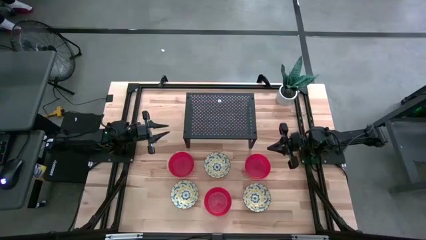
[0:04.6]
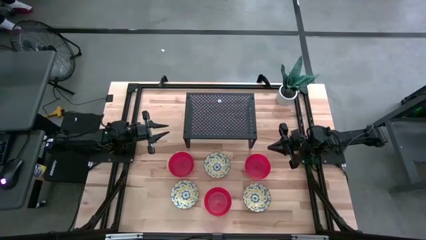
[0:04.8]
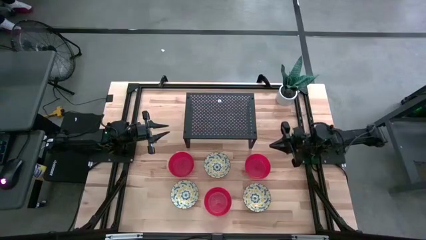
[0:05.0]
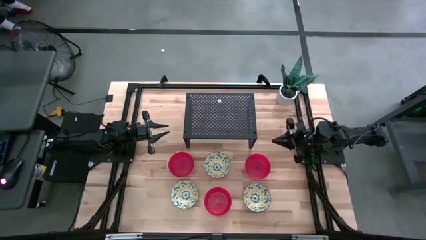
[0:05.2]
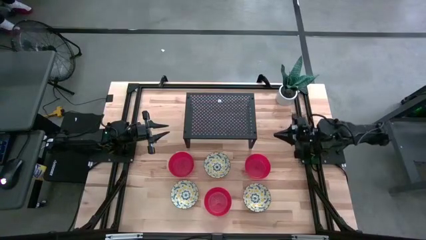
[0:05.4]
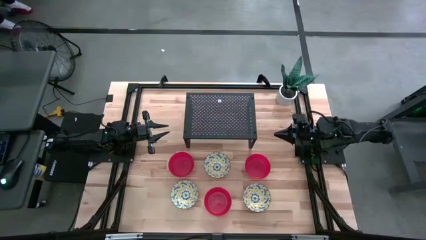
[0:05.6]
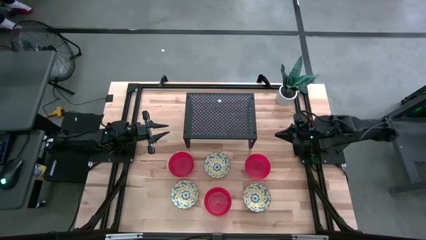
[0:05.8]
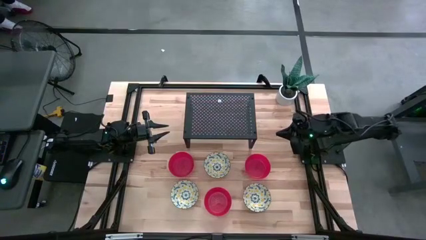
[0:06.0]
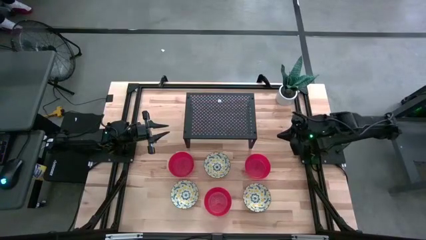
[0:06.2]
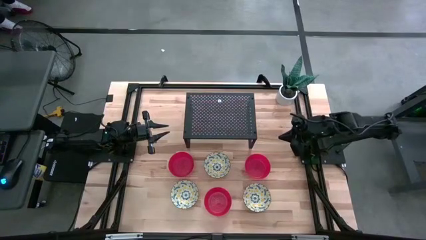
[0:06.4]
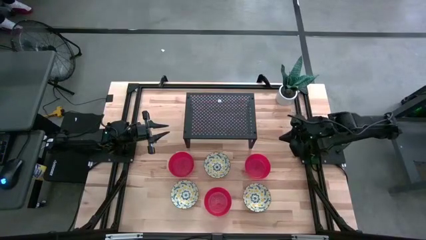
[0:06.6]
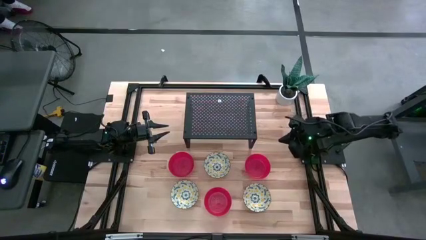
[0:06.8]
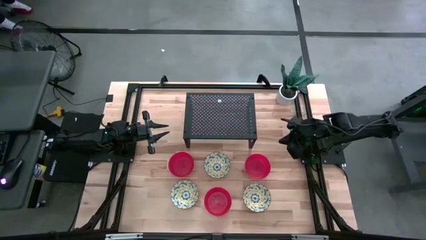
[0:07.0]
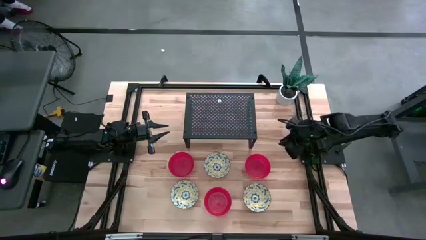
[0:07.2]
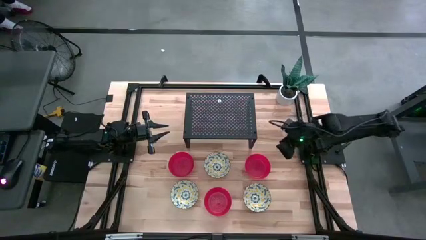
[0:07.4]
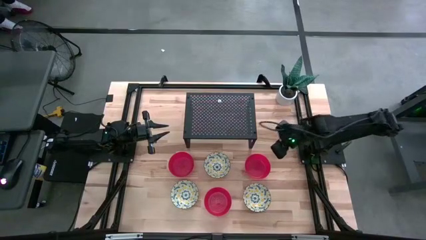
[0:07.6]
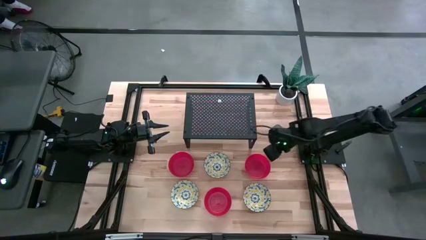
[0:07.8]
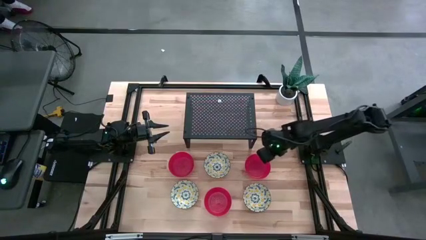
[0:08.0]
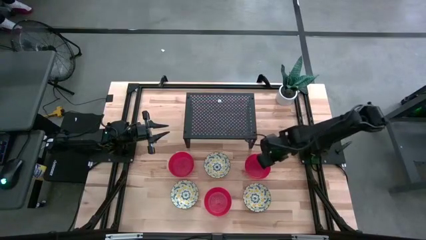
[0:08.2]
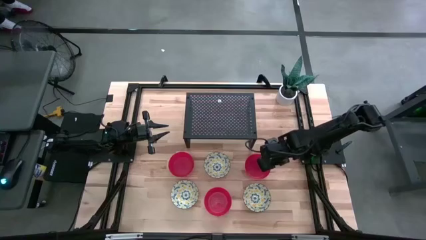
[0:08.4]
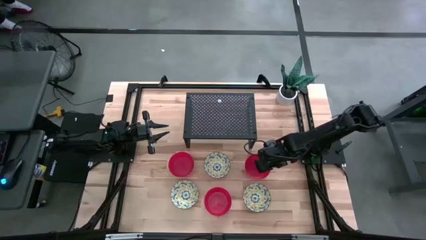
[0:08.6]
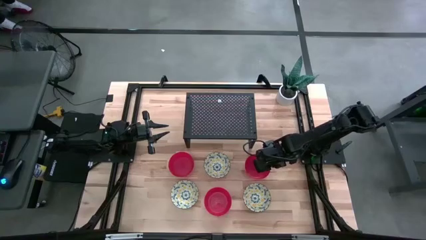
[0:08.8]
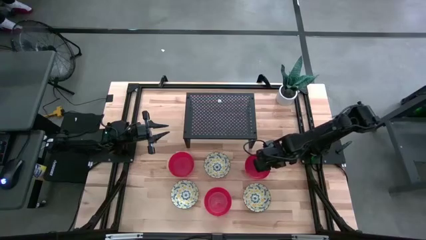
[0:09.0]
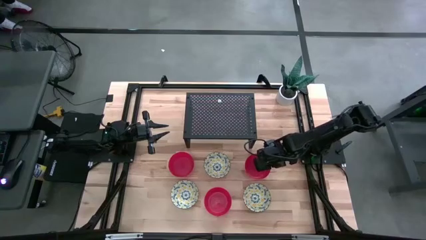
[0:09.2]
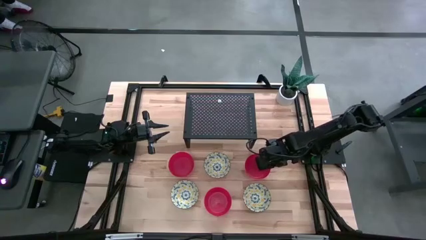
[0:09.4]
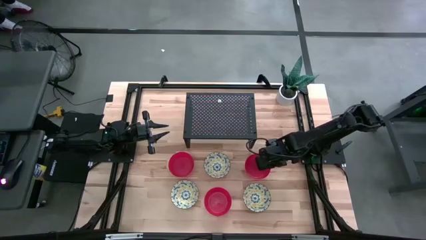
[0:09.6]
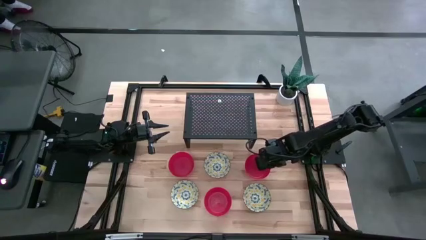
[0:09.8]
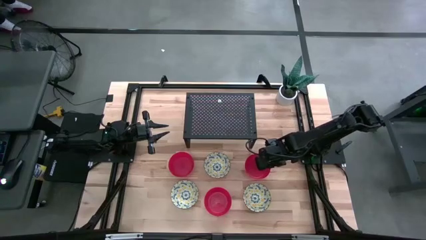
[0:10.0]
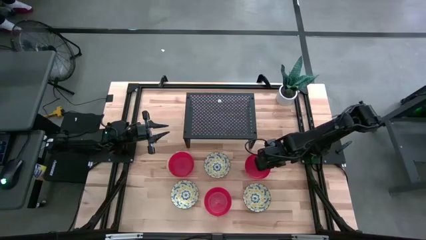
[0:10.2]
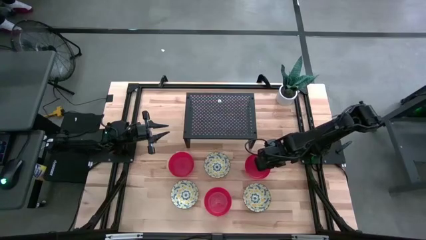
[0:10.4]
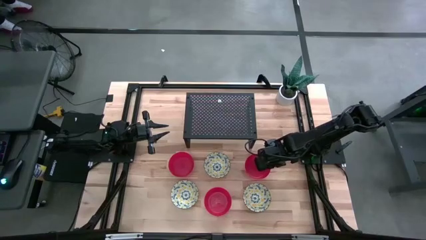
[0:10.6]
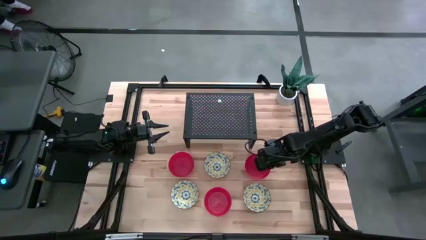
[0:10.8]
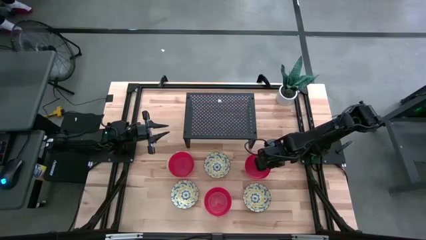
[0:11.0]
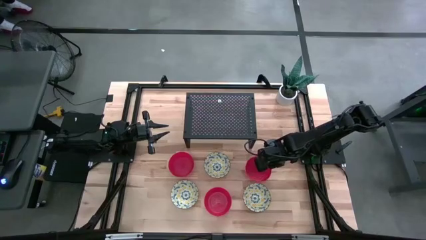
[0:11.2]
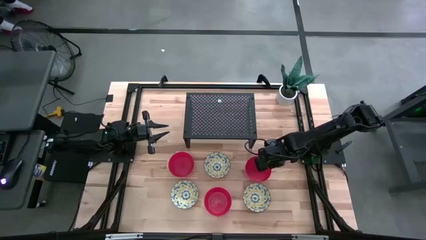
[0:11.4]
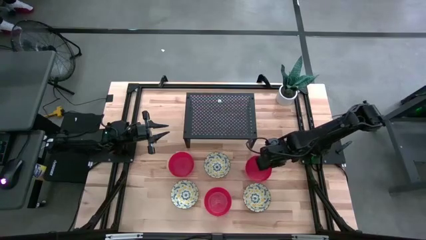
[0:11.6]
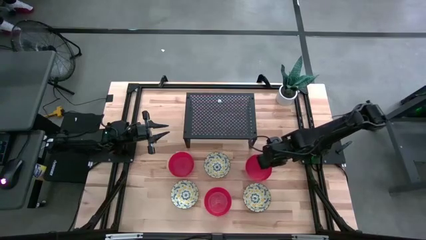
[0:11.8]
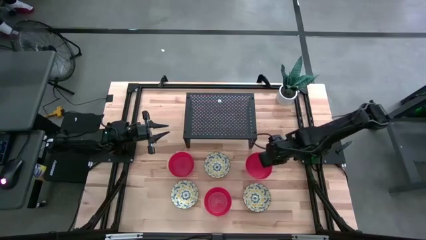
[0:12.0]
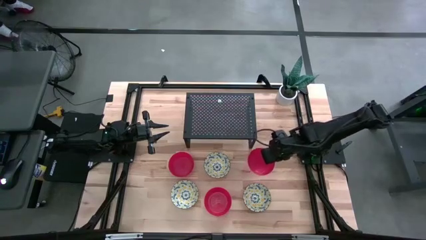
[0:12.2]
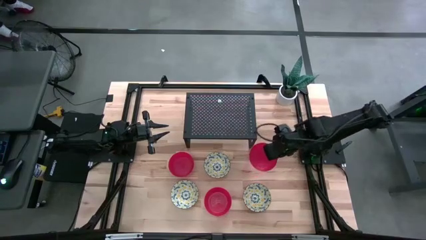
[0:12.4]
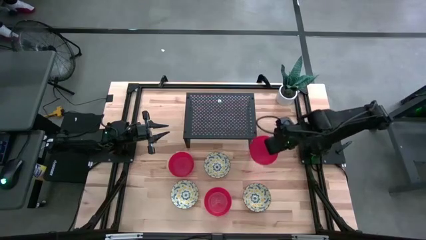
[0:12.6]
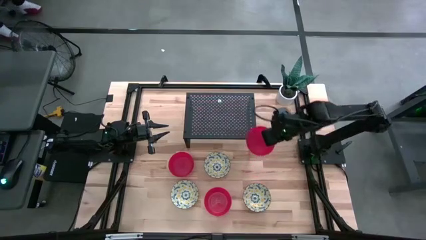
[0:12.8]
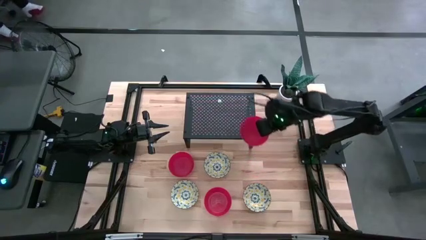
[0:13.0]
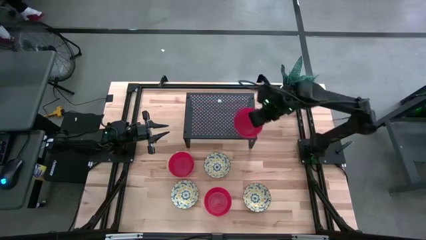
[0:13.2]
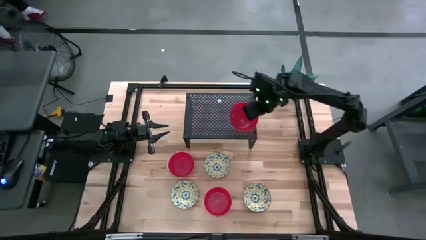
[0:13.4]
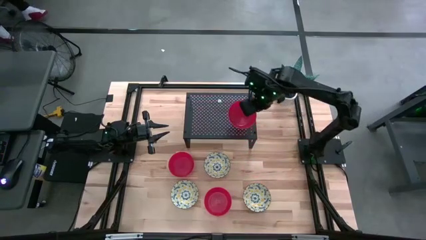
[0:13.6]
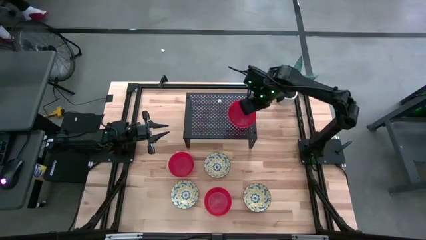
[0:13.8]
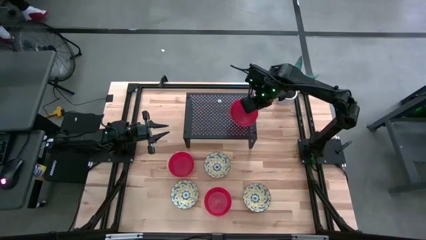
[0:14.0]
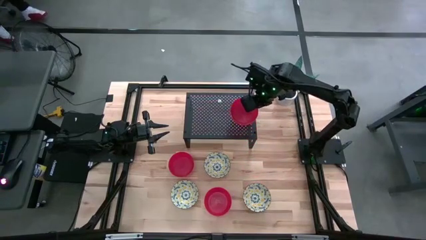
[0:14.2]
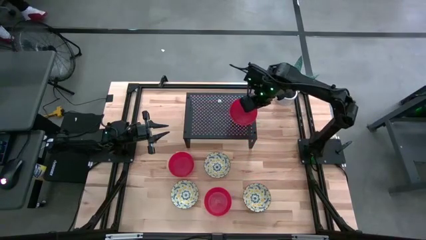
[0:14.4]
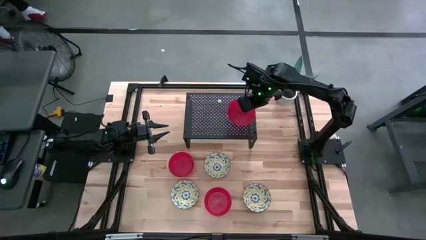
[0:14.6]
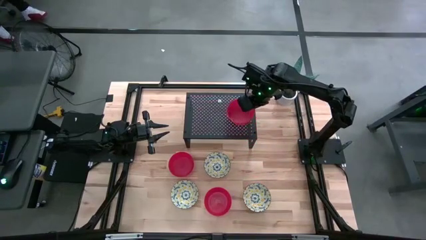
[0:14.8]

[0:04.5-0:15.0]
Task: Pick & Place Mini bowls
Put the top right red bowl on the shelf

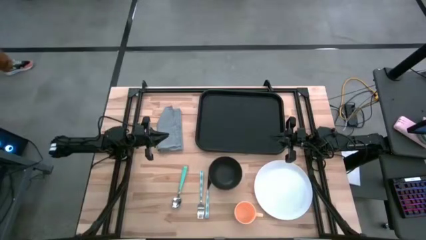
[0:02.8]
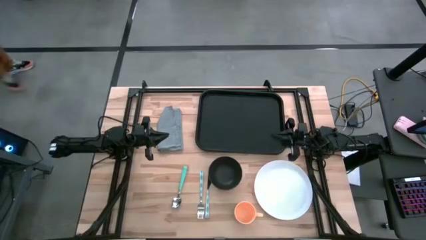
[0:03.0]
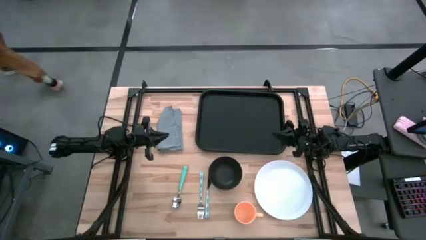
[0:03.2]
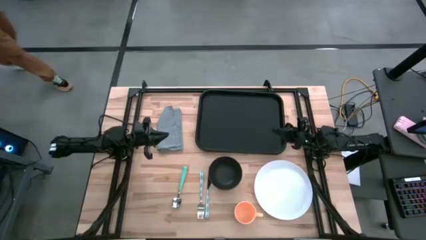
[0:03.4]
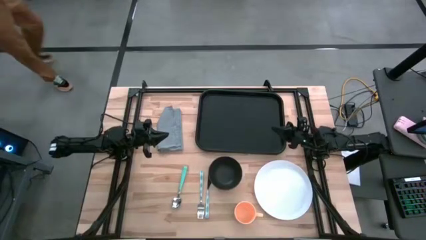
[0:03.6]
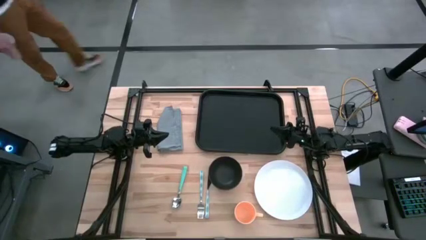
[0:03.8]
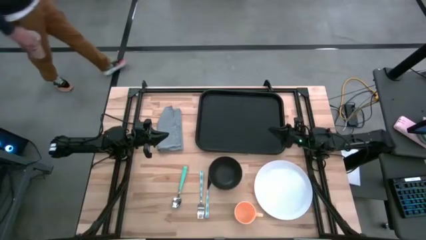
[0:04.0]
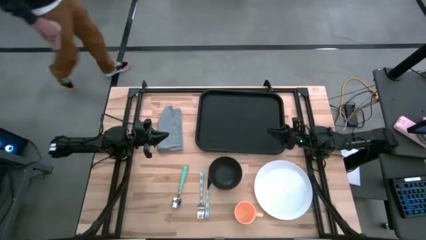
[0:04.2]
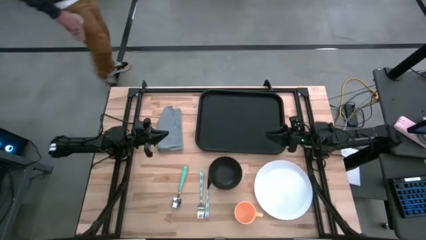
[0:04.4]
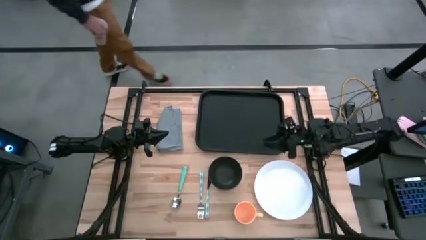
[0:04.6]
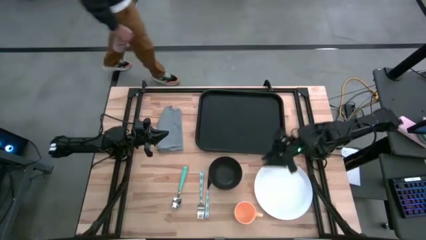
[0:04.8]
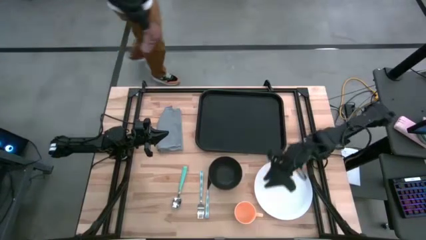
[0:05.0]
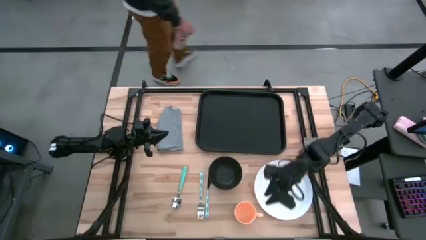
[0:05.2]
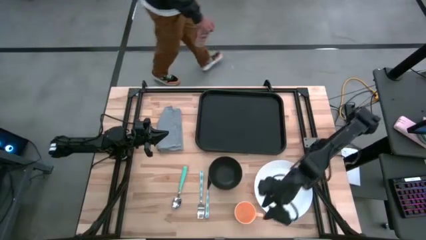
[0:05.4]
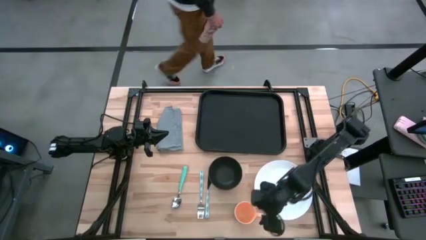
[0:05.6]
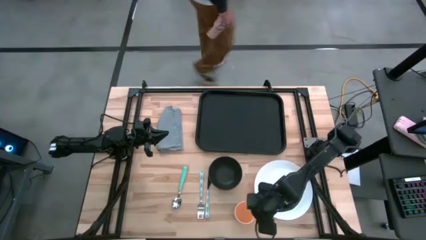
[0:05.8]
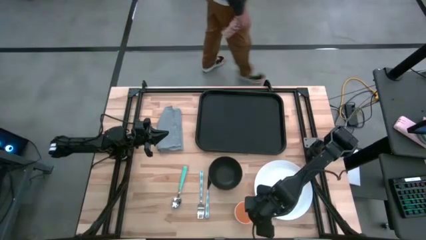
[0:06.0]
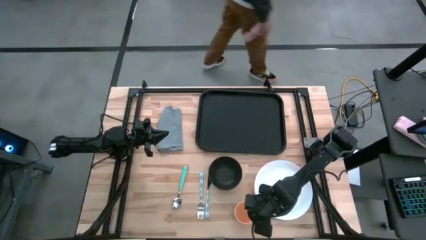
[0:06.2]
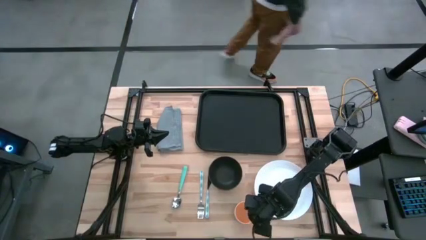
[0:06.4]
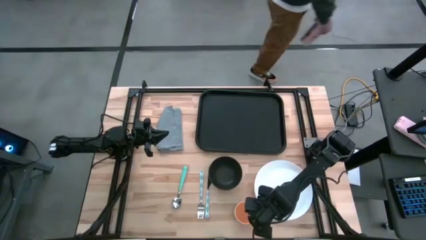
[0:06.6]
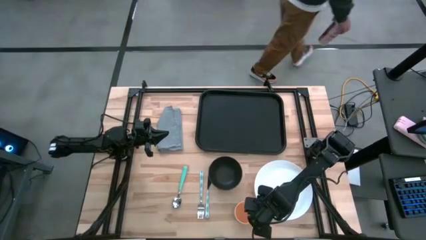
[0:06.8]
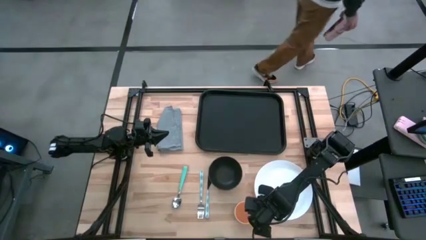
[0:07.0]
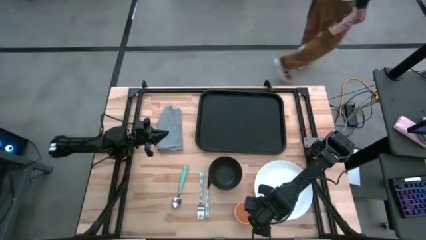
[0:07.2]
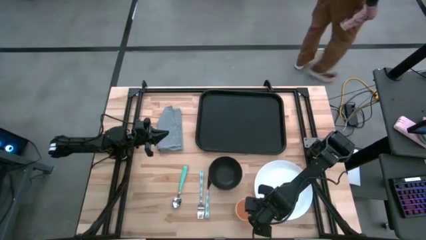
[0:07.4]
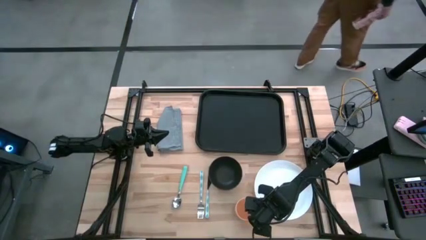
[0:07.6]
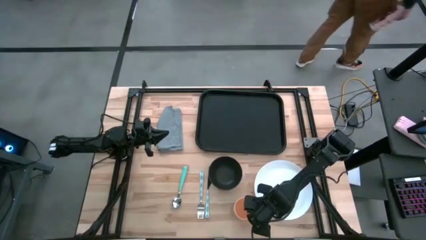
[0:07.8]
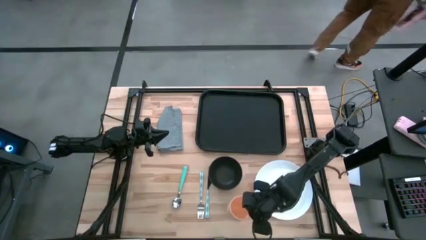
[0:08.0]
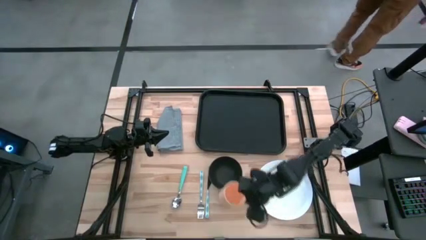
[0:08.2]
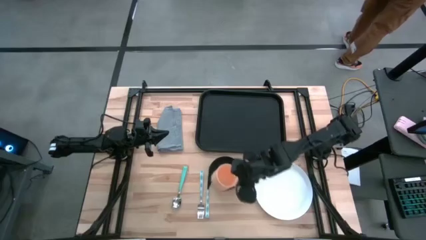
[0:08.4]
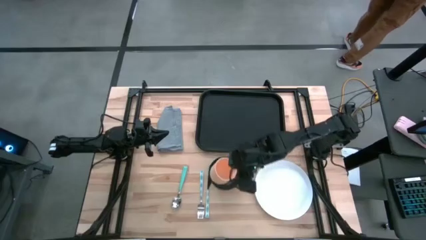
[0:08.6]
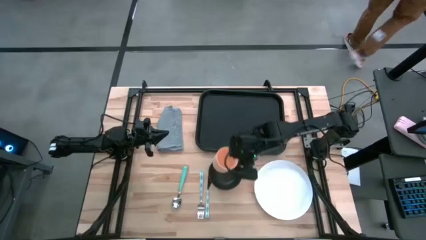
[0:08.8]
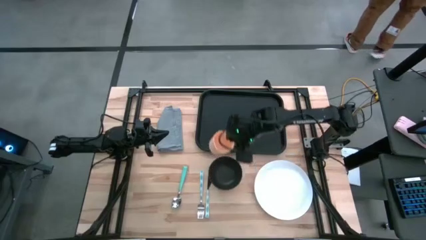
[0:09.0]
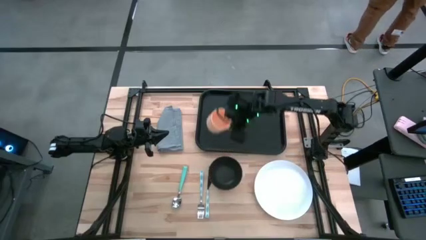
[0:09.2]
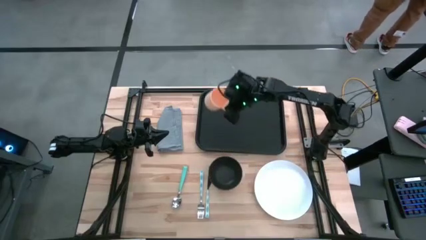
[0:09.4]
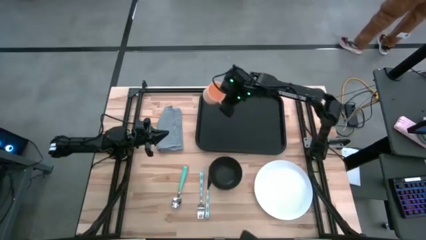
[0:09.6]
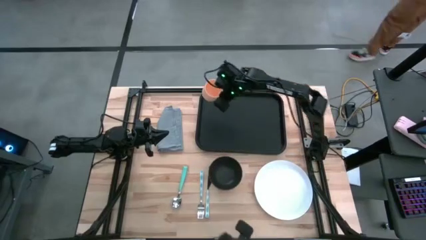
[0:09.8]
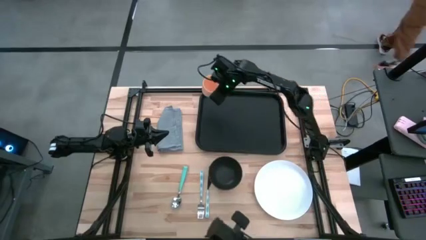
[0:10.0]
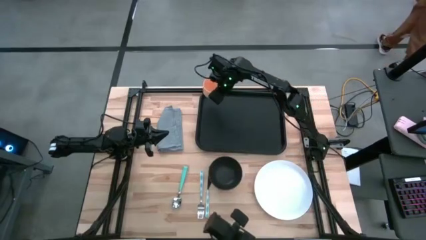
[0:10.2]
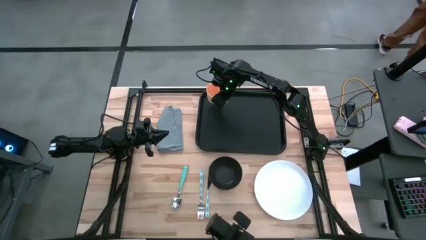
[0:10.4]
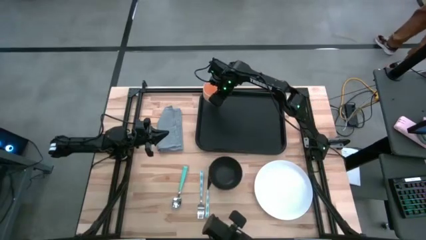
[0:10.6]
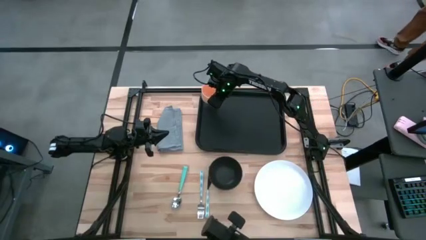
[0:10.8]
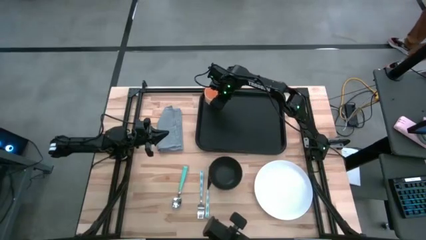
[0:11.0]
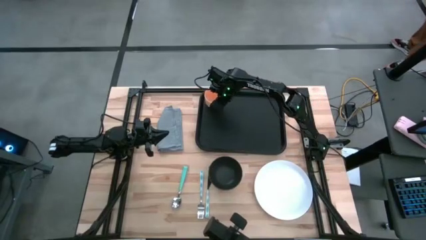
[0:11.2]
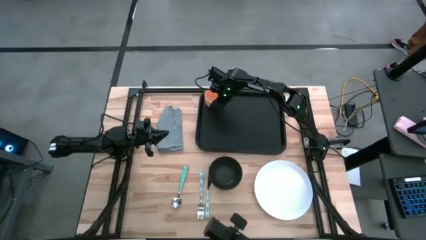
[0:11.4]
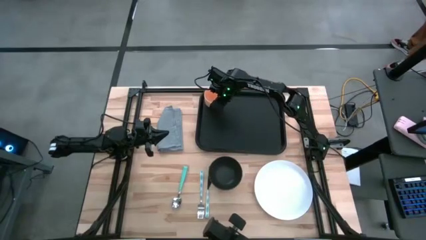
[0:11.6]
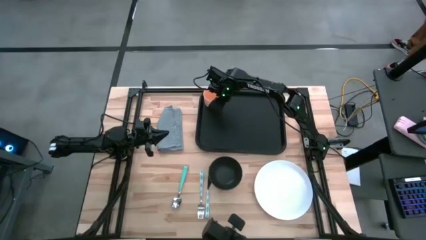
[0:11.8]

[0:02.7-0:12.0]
Task: Set up tray
Put the yellow mug on the black tray
